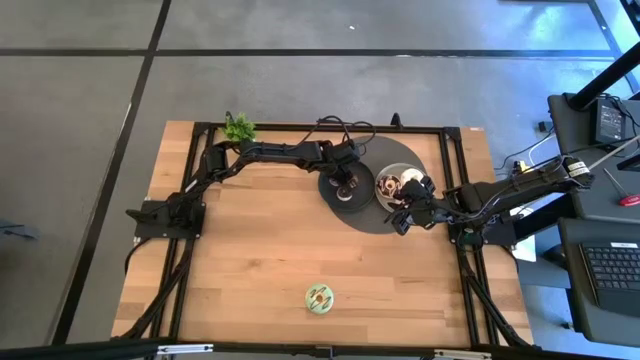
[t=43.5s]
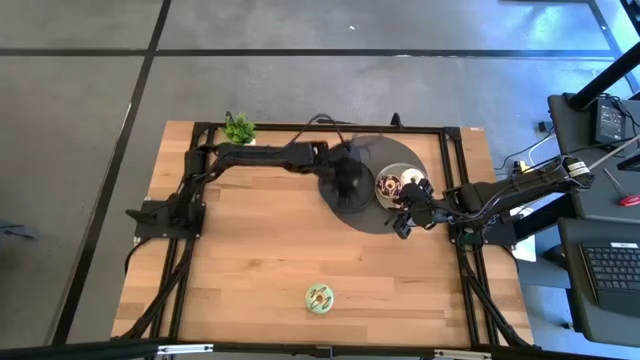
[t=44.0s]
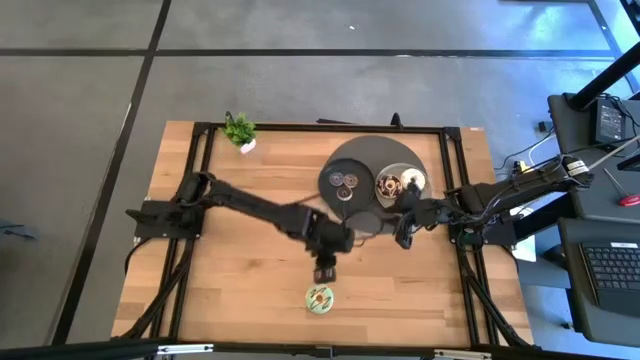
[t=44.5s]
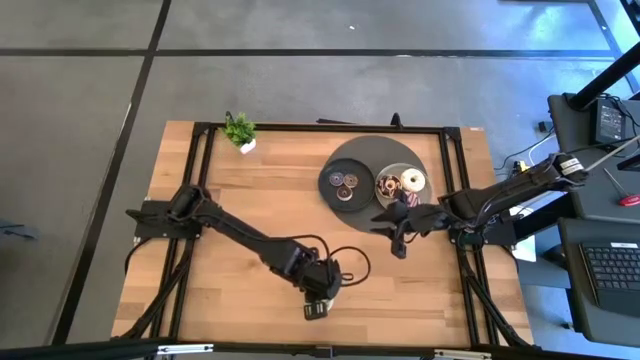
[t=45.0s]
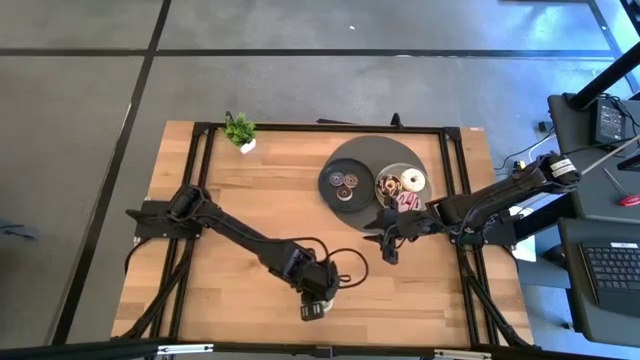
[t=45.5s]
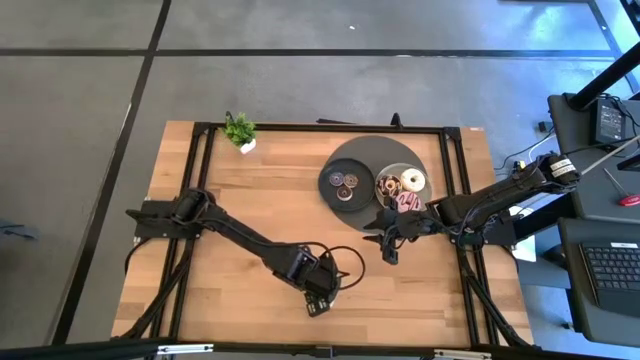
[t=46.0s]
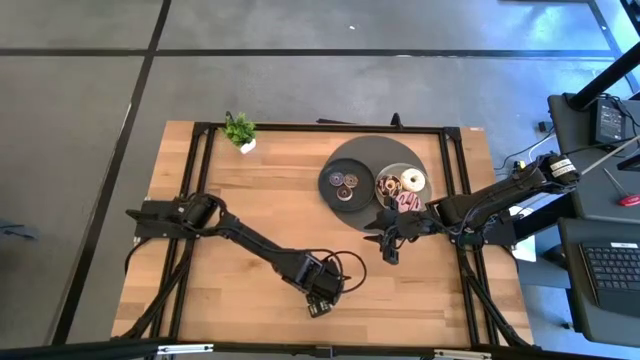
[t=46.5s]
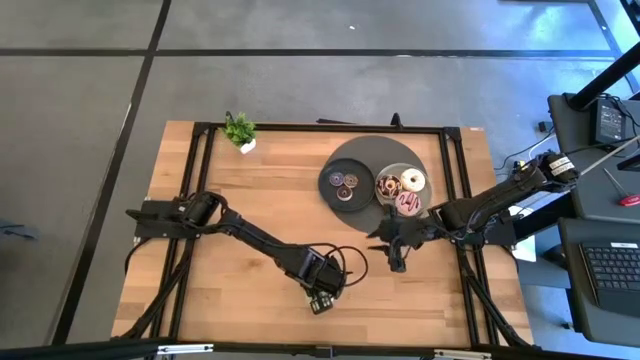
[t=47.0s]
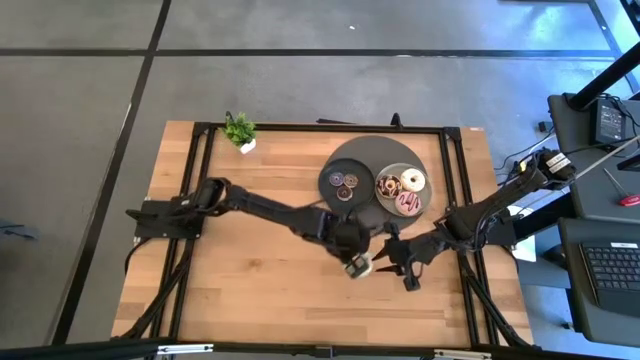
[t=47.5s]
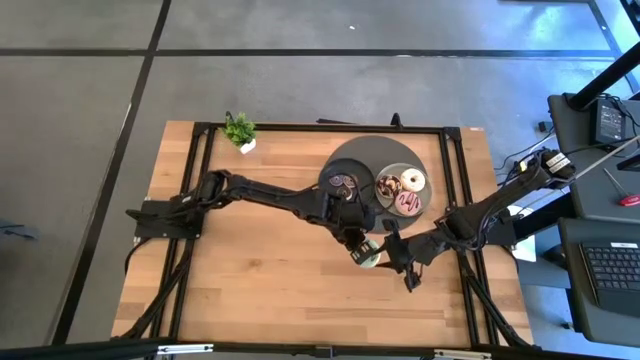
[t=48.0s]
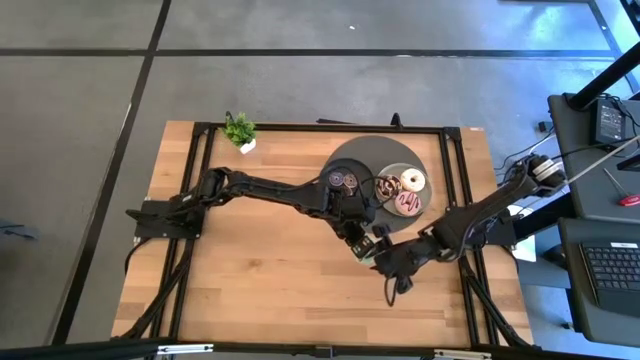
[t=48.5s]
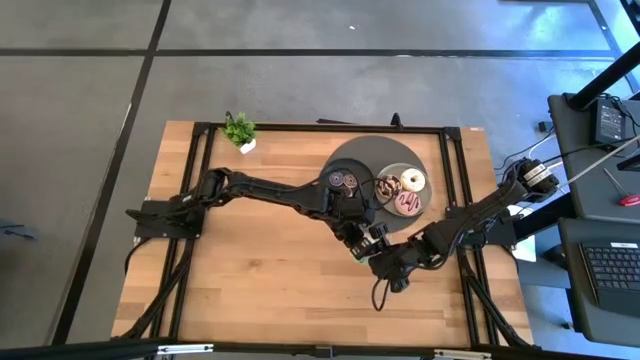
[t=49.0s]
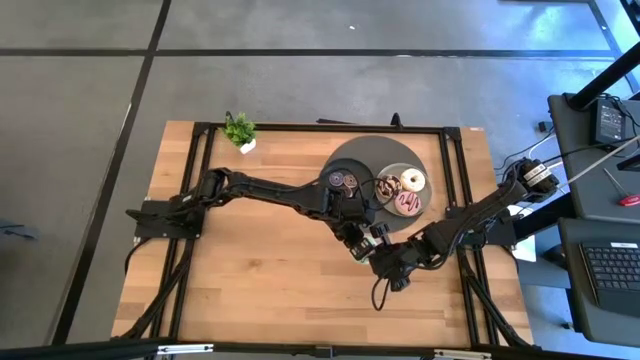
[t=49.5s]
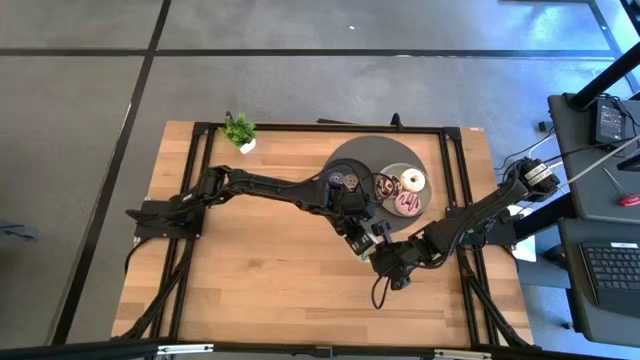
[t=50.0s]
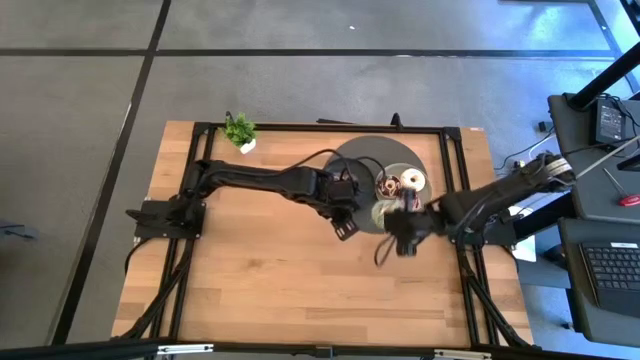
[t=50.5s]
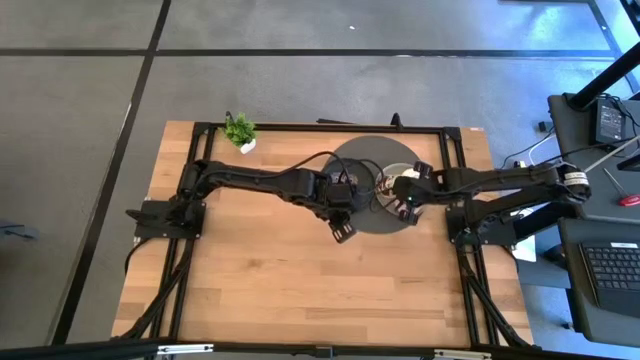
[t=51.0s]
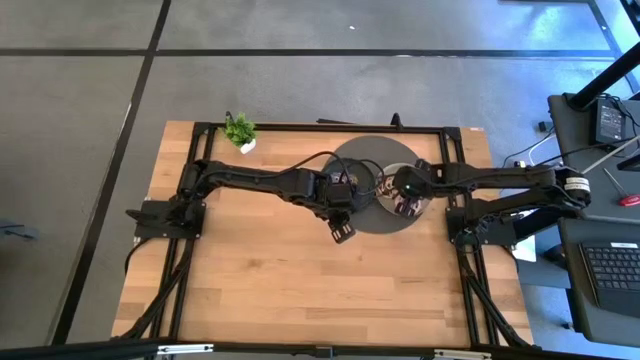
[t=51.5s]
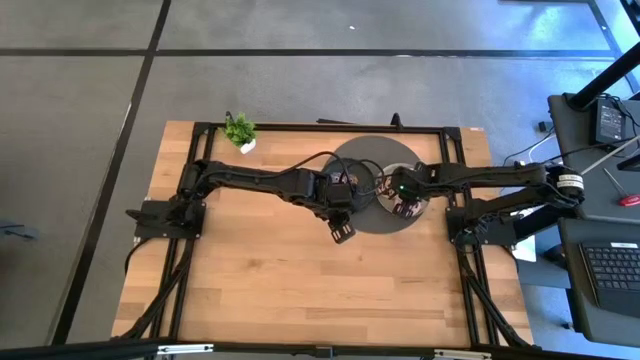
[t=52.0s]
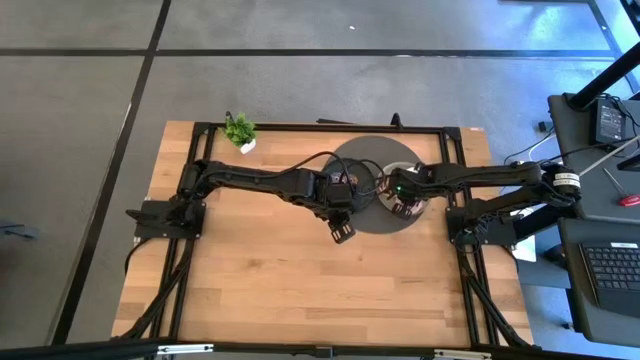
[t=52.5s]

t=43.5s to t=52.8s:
Task: Pick & Place donuts
Put the large blue donut on the gray plate

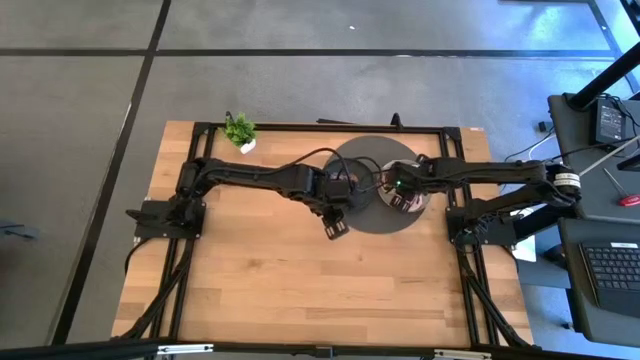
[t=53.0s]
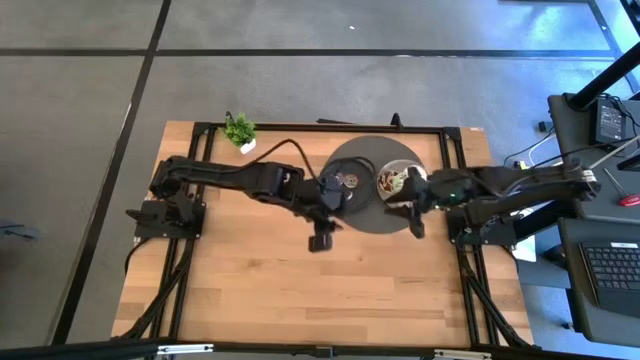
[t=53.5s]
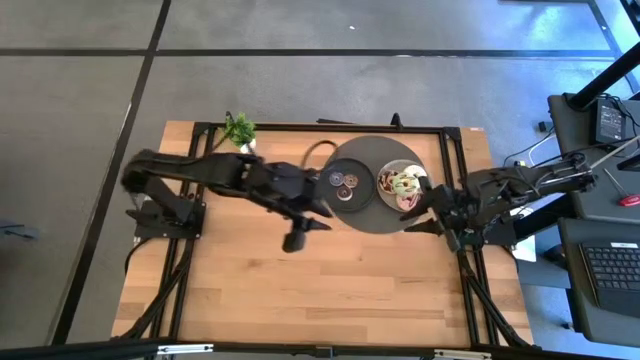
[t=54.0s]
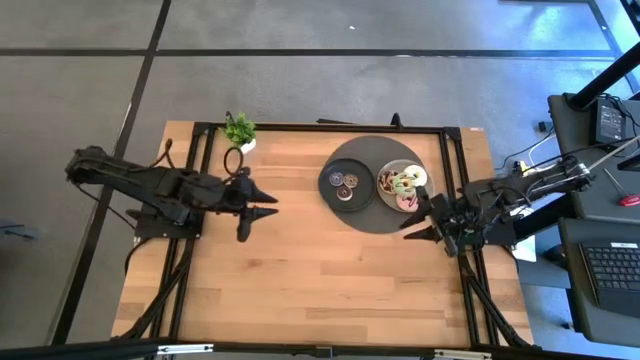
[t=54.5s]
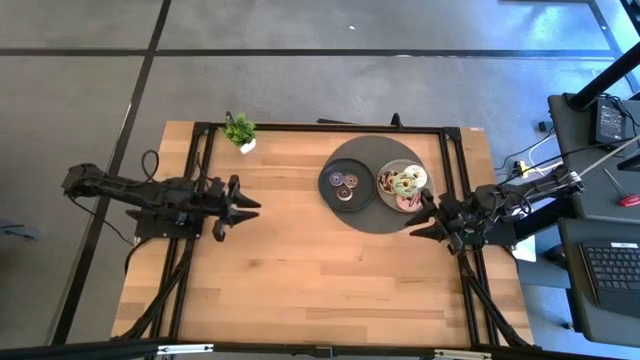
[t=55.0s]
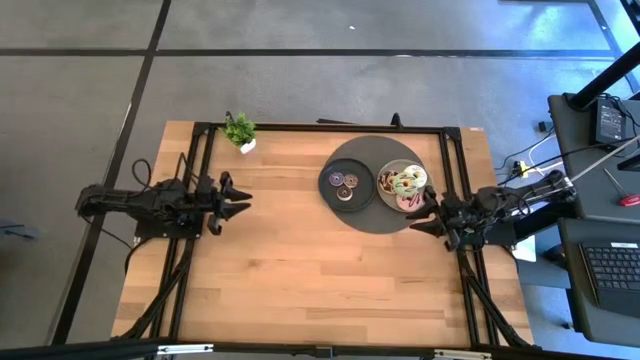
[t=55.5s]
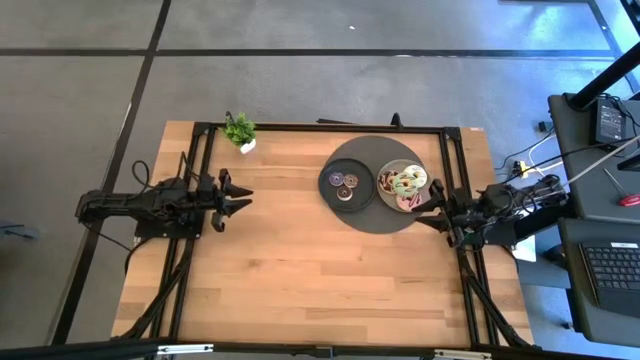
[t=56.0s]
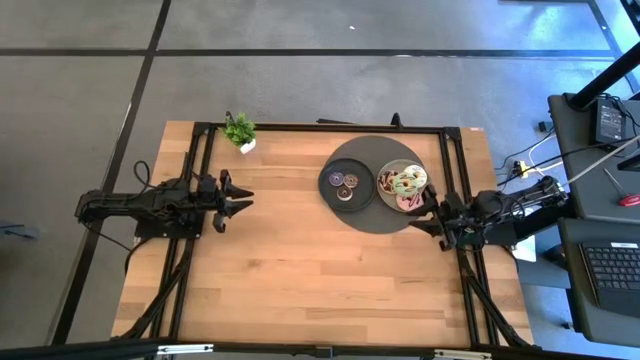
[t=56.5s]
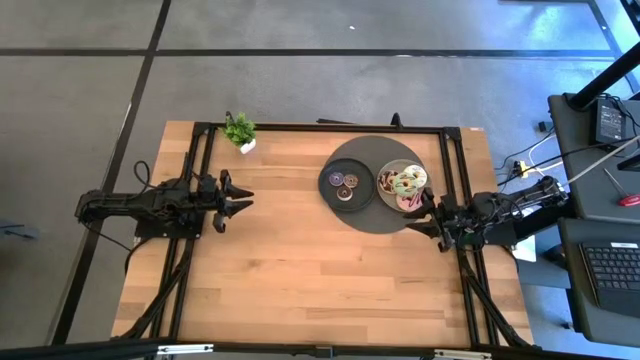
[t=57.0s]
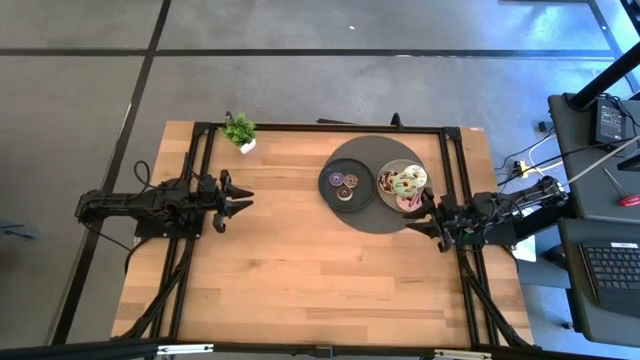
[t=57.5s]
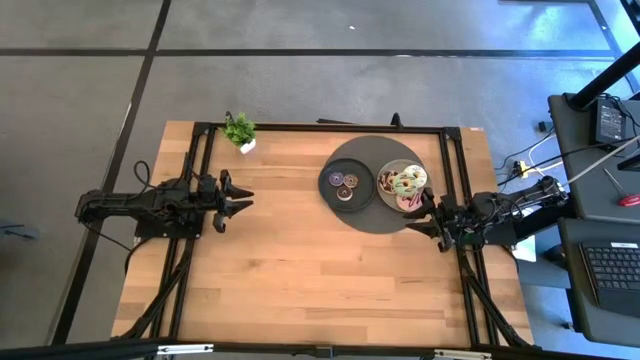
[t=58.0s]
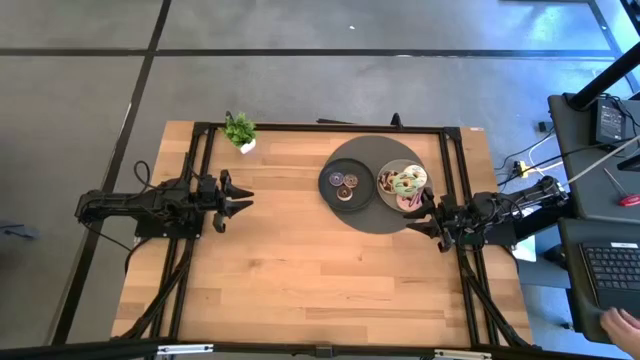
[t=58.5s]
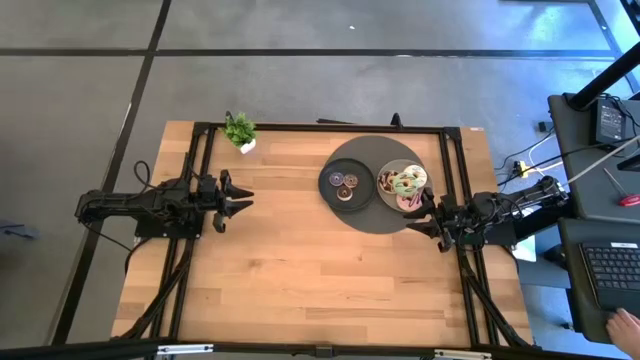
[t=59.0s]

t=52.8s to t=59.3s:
Return to Home Position

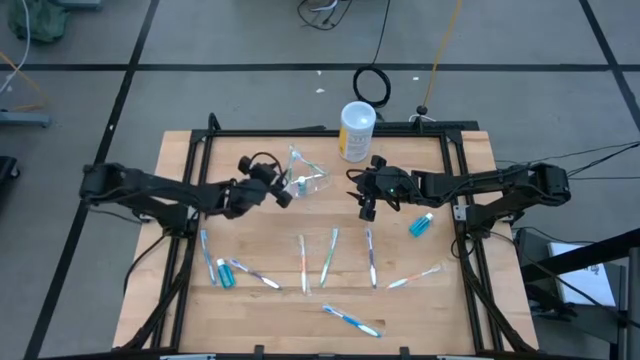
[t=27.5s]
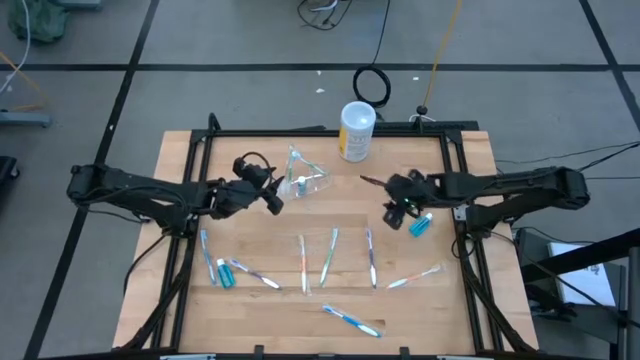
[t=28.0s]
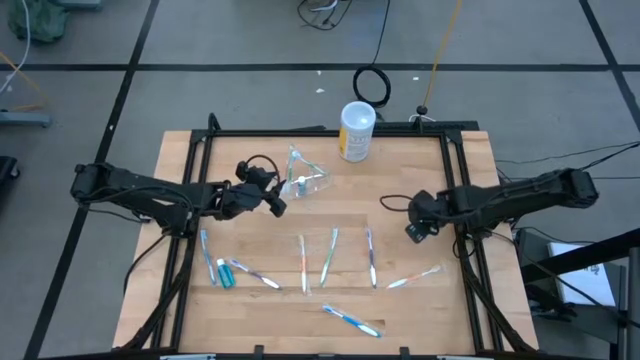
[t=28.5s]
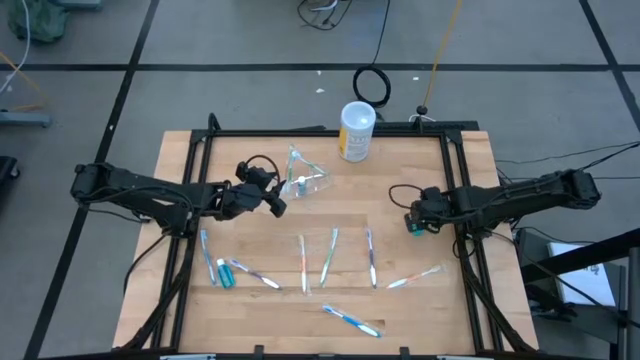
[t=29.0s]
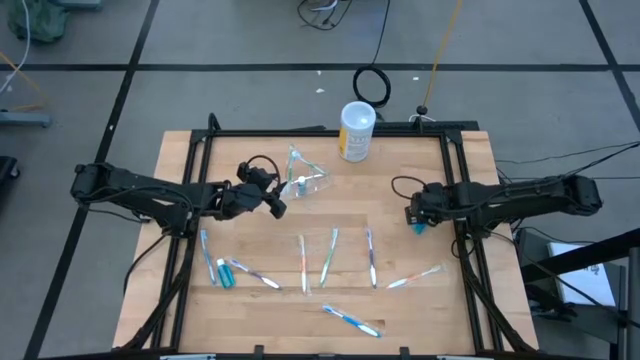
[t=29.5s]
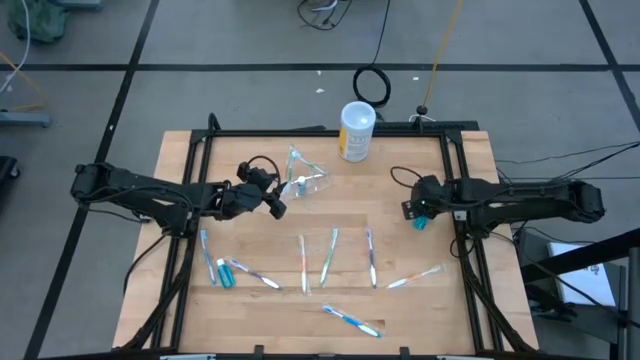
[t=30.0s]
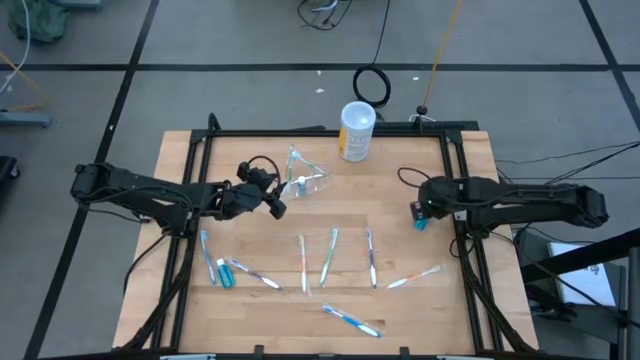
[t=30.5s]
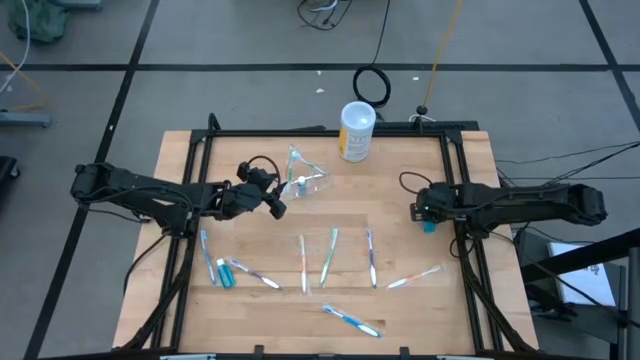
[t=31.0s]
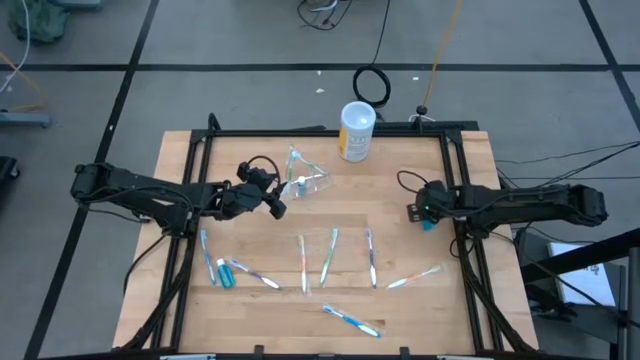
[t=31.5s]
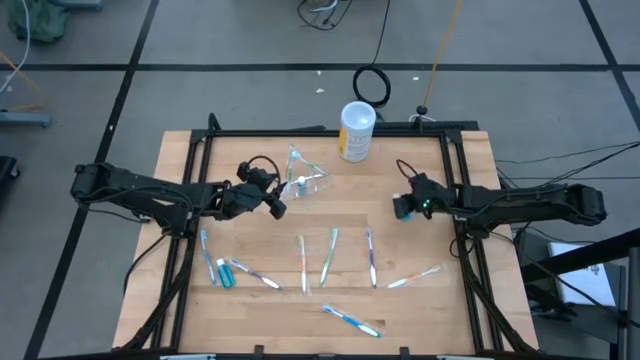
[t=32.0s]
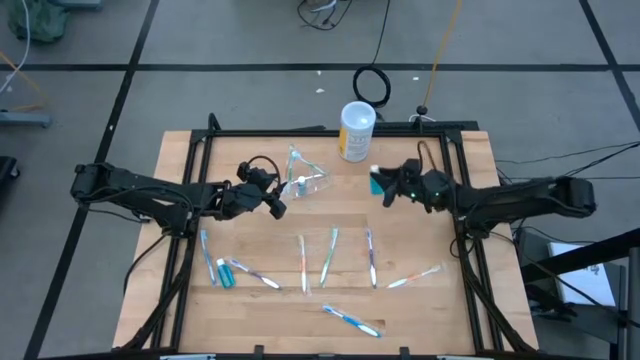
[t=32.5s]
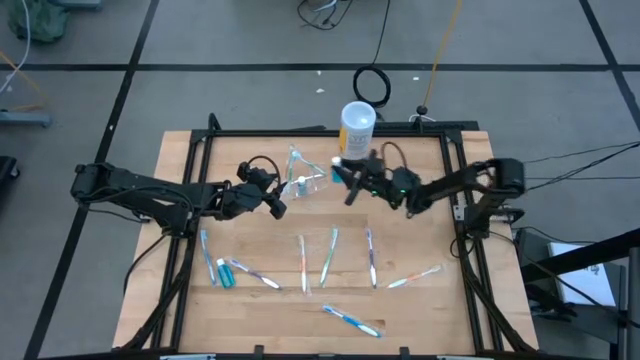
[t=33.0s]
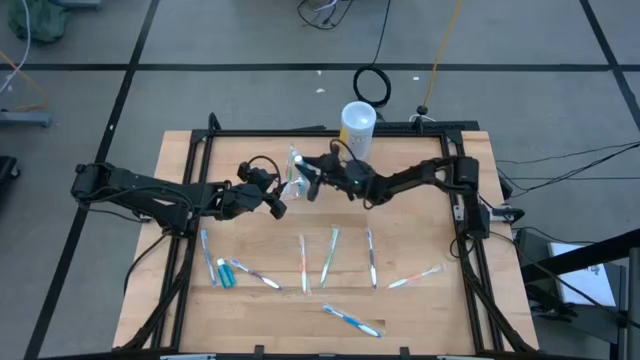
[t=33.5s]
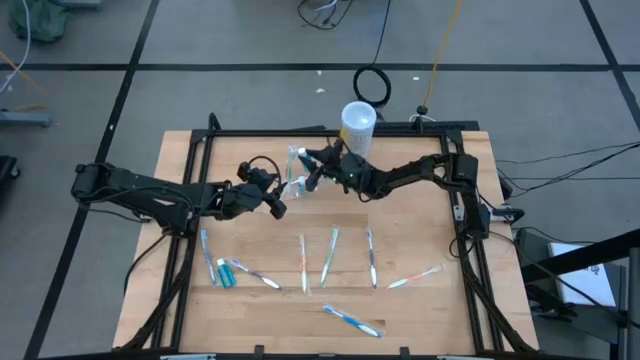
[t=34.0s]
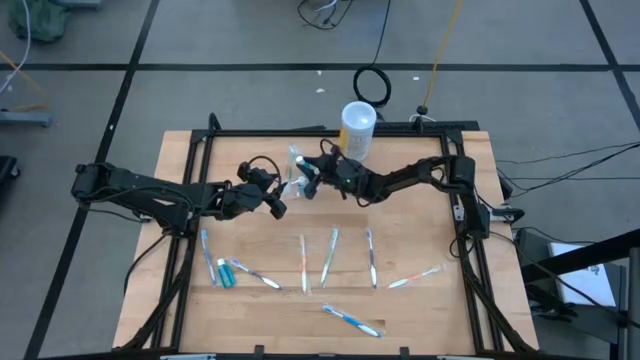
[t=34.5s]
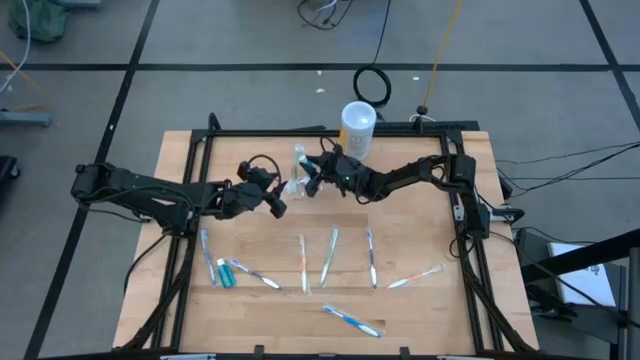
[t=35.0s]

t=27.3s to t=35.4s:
Task: Pick & Place toothbrushing station
Put the right blue mouthwash bottle into the transparent organizer
